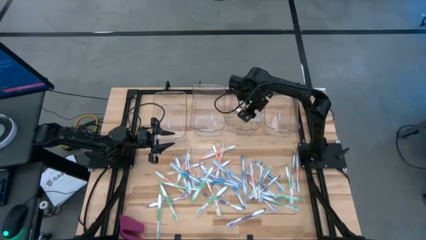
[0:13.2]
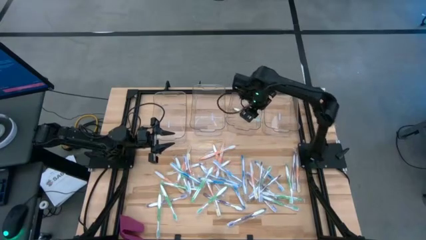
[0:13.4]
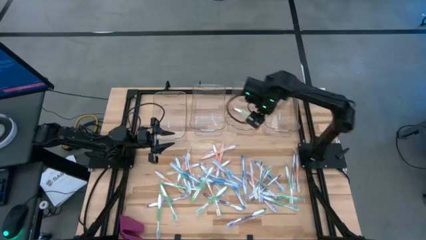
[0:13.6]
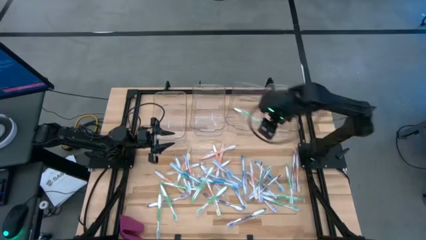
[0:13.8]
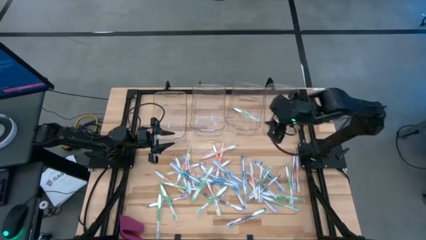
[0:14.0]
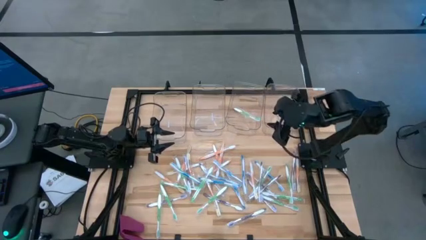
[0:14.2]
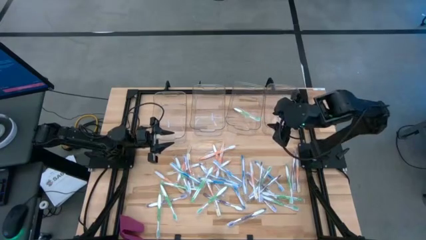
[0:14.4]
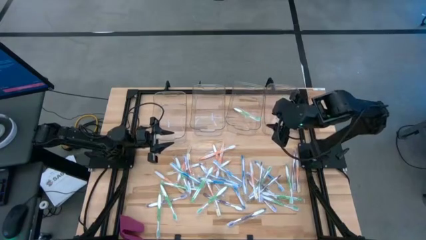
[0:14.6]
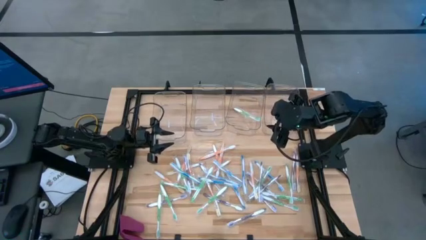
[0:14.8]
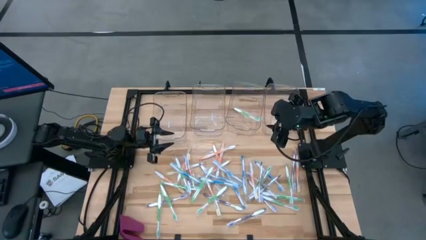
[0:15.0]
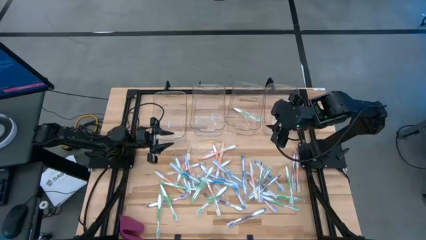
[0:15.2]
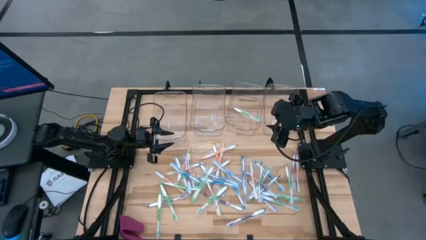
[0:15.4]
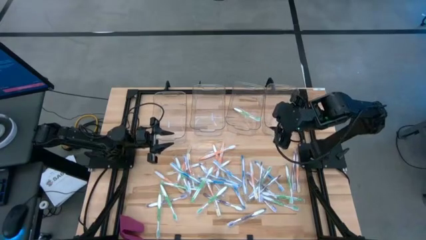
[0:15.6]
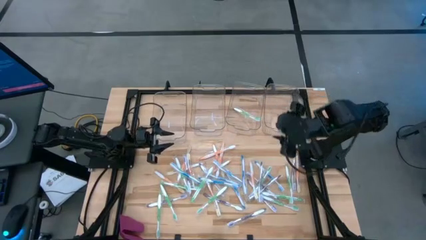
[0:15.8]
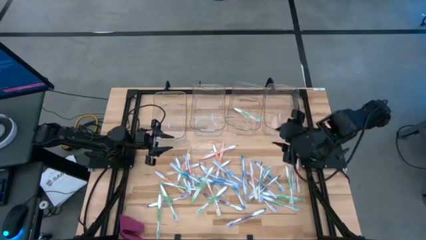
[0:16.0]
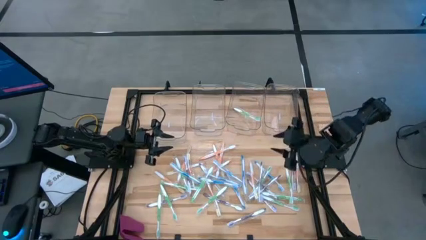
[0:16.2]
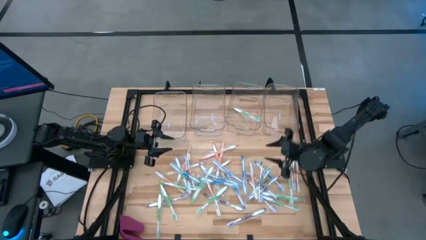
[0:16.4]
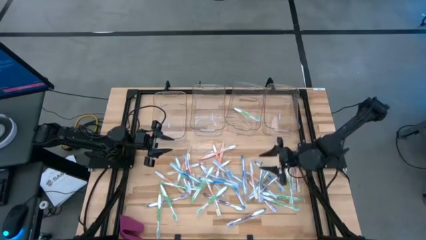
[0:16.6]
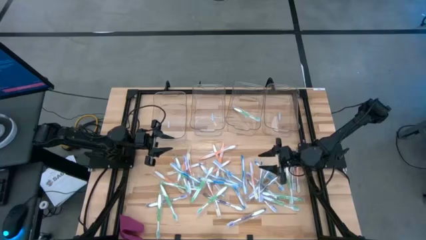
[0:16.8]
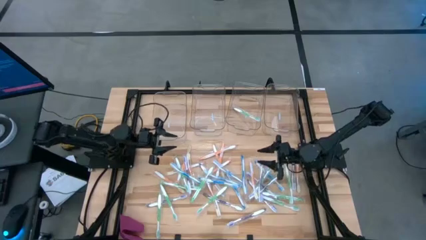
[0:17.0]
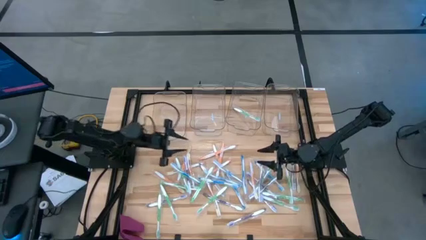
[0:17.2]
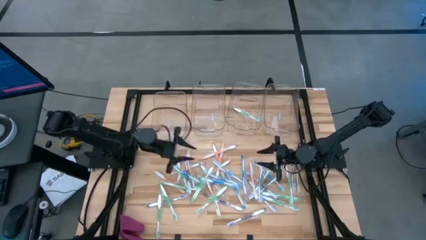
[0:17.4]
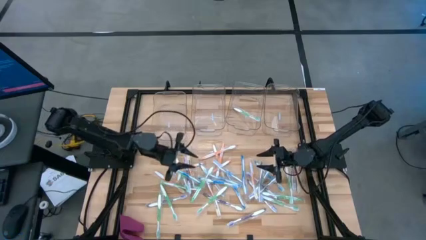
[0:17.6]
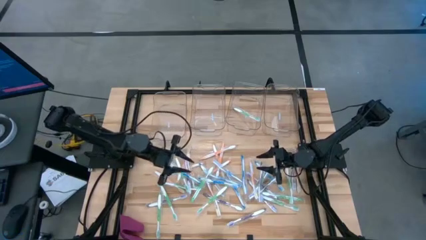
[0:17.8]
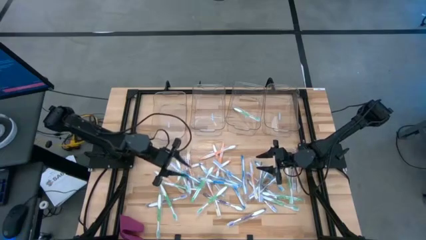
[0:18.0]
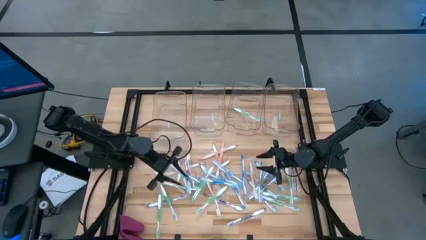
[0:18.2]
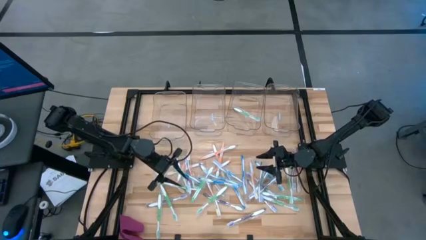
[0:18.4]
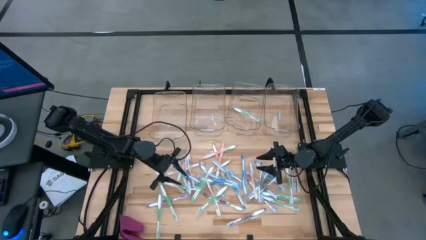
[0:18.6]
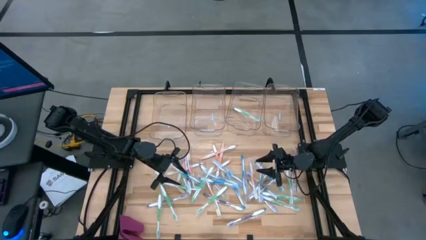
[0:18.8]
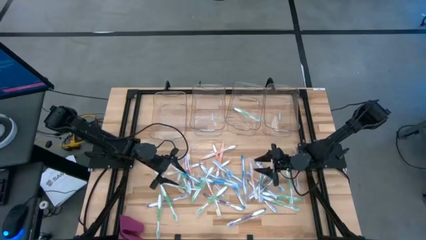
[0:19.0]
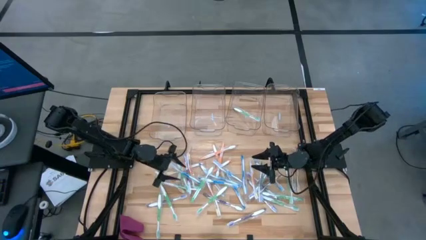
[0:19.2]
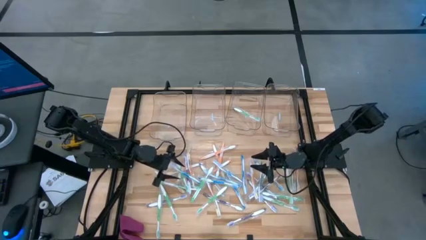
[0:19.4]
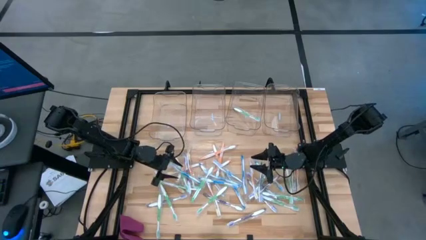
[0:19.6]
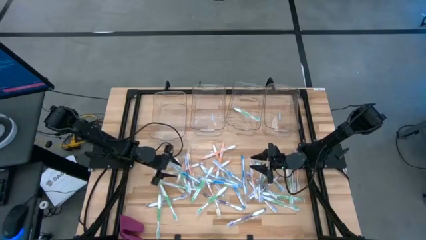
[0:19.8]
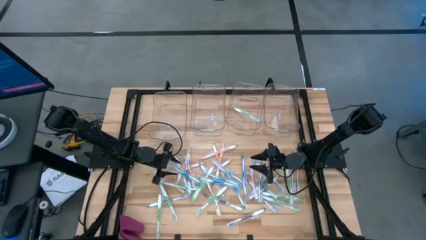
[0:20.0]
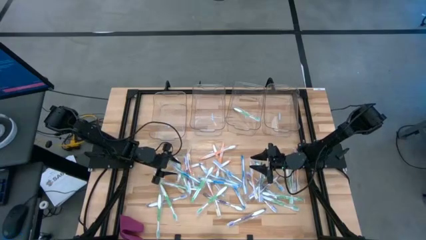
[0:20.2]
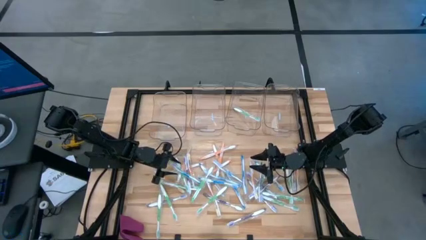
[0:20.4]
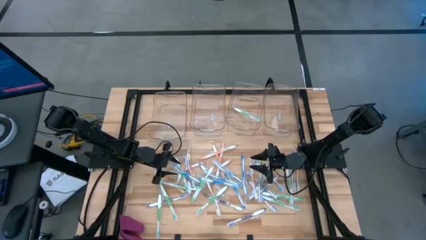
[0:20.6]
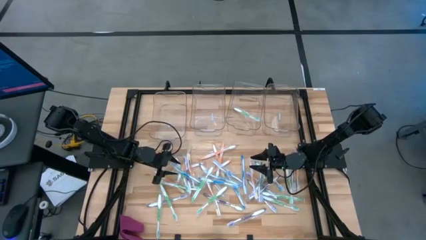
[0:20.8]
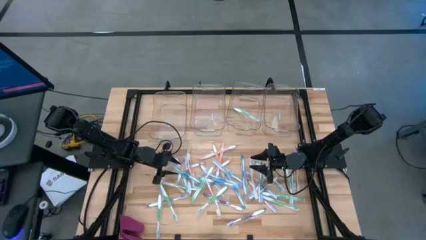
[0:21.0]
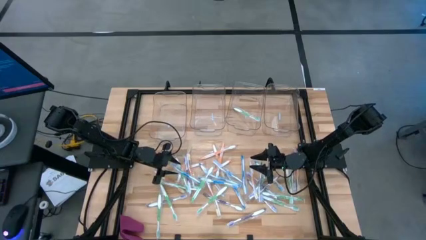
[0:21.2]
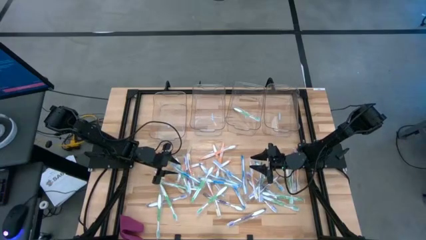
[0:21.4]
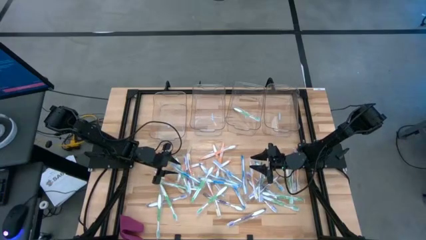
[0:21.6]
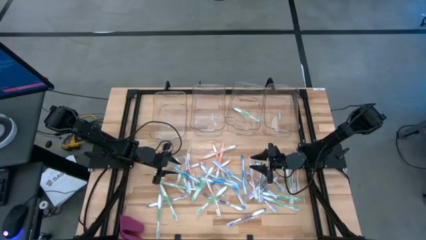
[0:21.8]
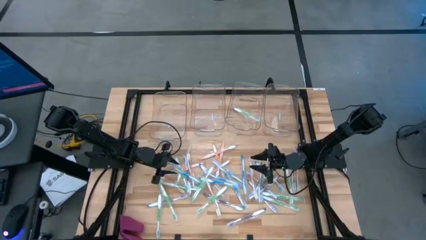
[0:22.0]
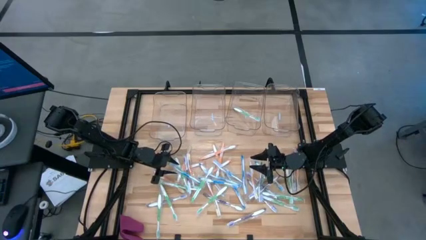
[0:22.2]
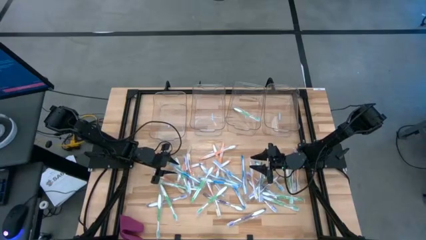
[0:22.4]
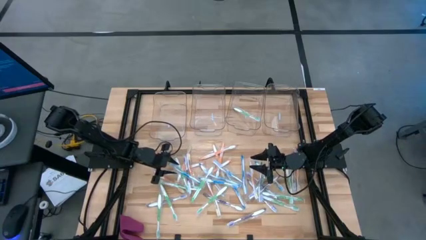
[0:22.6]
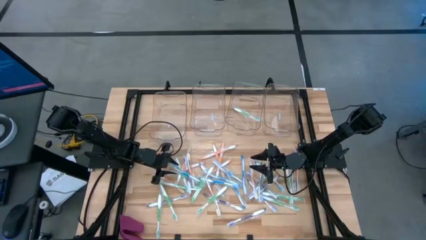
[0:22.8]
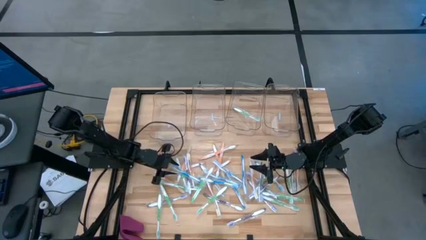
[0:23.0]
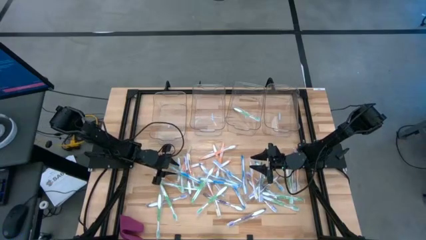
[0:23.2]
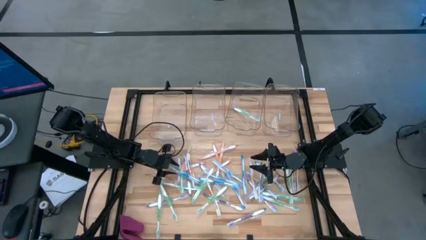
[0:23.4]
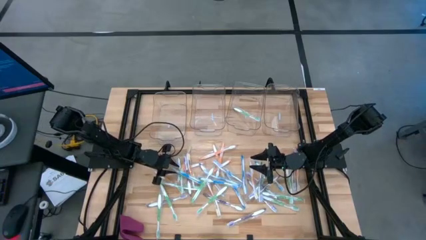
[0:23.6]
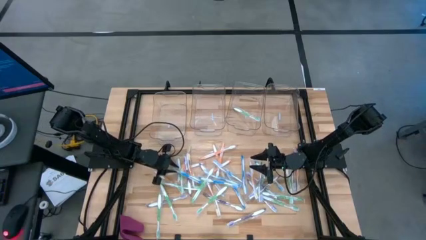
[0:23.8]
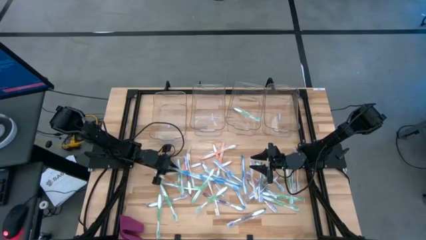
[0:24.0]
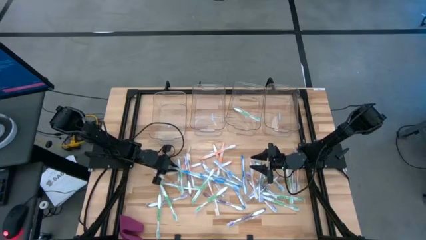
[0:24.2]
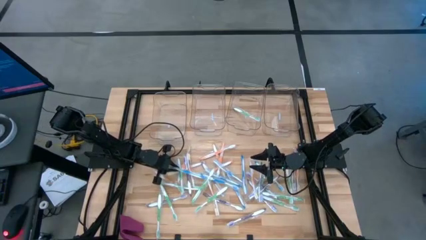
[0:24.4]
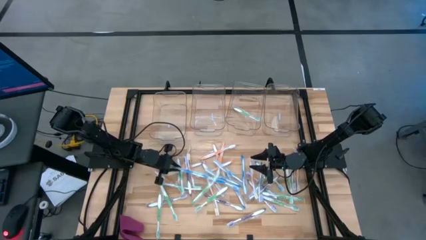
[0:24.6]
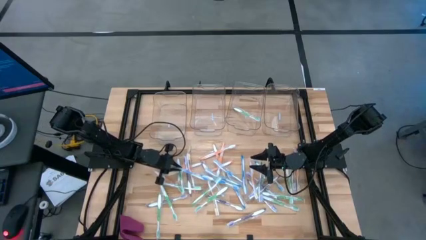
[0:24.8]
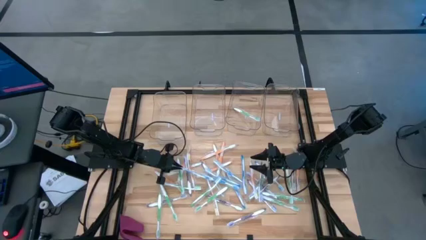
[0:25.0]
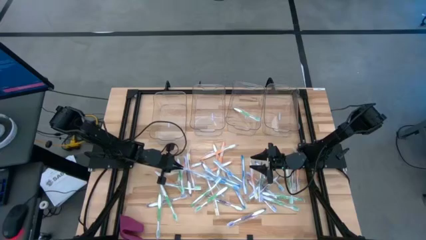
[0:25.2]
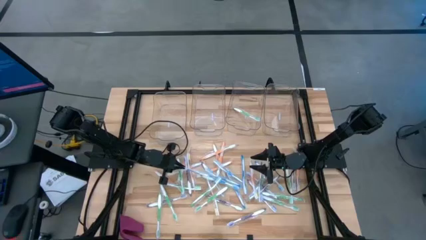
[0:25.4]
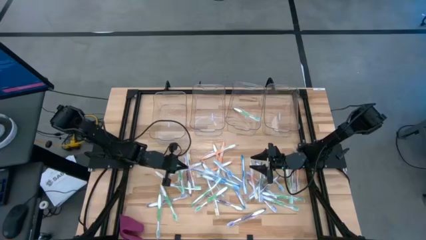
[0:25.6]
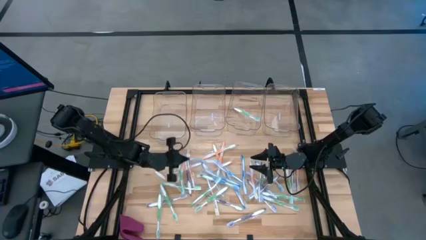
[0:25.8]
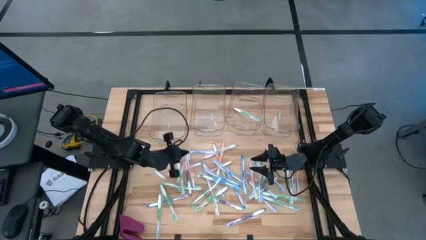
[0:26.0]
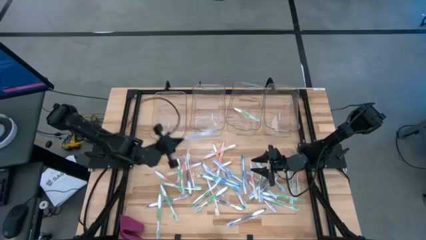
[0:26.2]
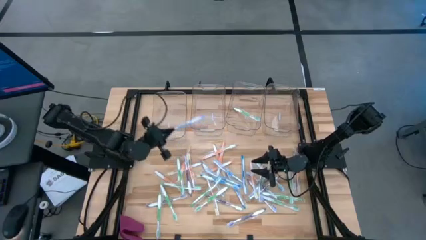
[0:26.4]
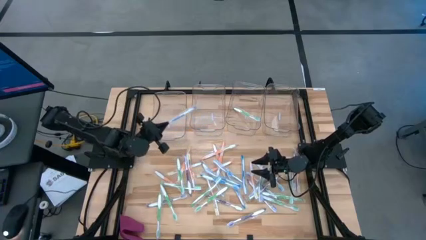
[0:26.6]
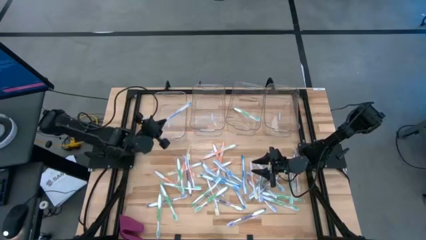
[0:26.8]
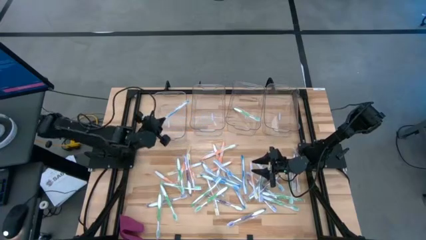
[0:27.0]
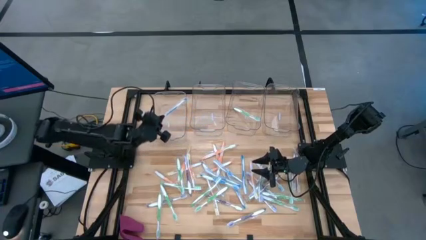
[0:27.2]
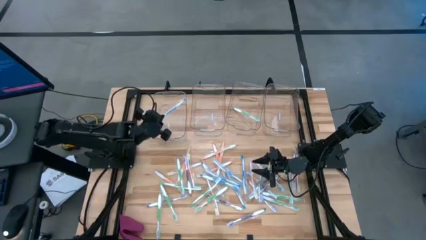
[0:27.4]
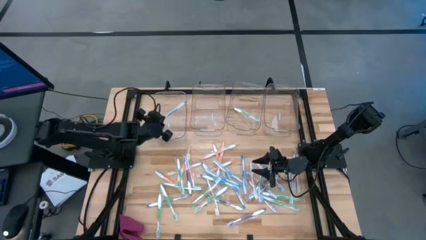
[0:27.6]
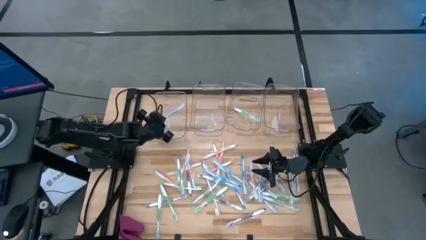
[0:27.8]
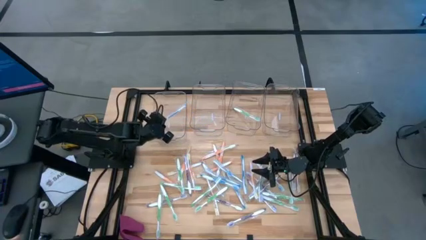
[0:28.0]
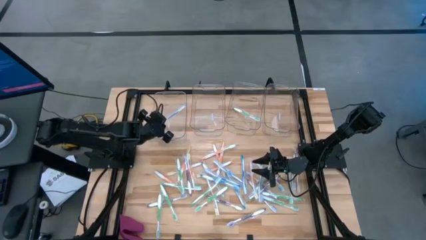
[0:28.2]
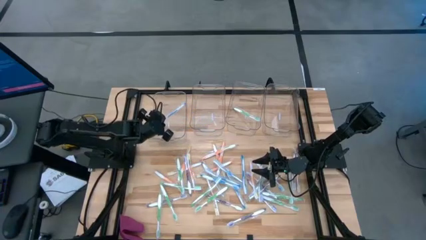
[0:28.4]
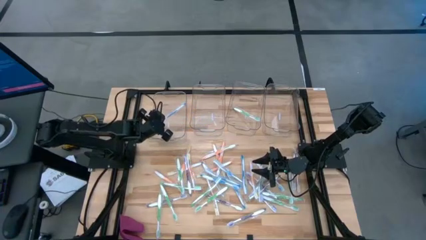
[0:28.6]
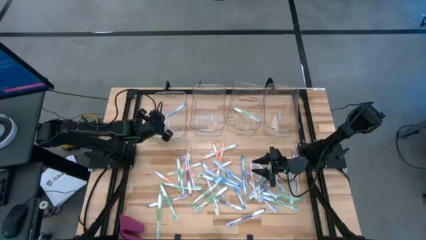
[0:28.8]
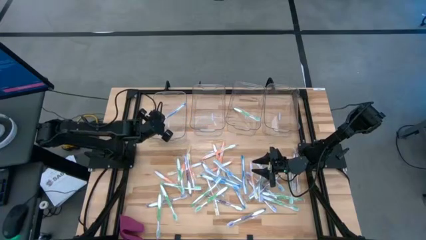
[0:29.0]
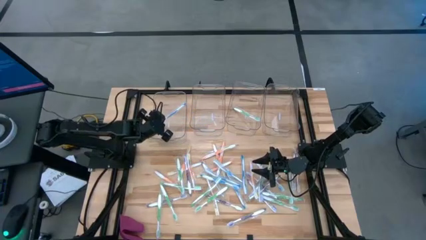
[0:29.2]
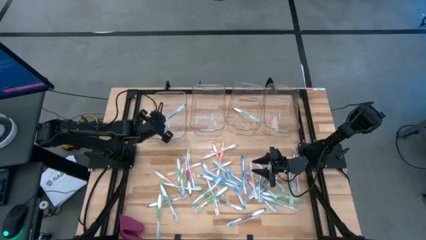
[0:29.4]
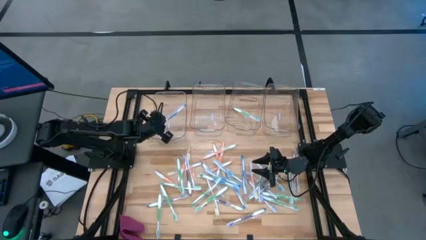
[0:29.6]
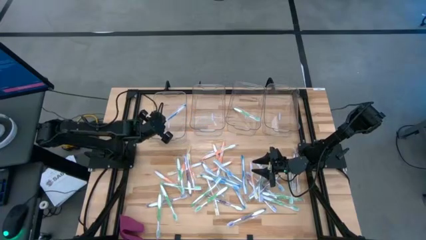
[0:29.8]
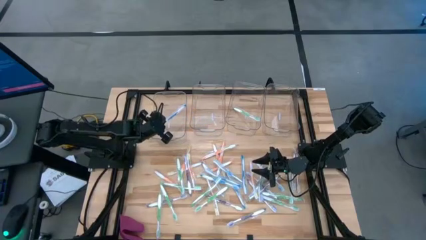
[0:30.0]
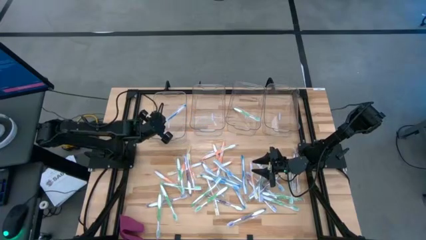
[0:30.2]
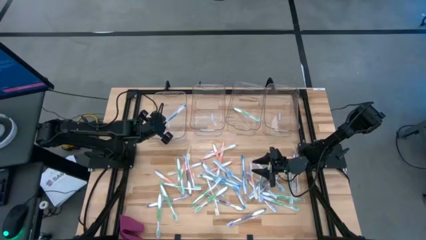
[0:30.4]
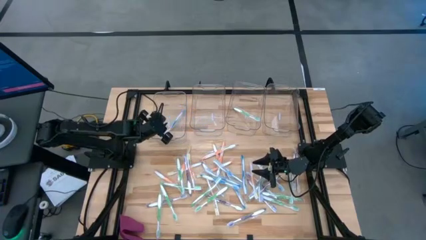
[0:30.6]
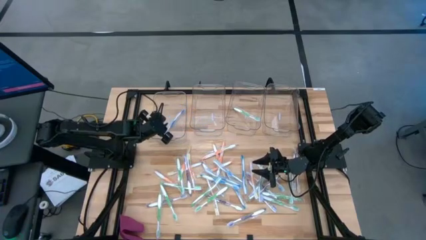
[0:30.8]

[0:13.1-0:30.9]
Task: Pick & Place Toothbrushes
Put the blue toothbrush into the left transparent bin
